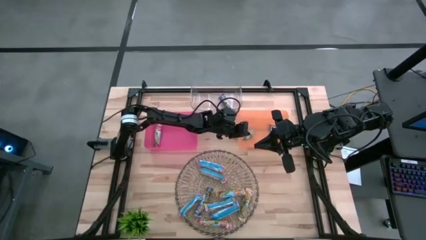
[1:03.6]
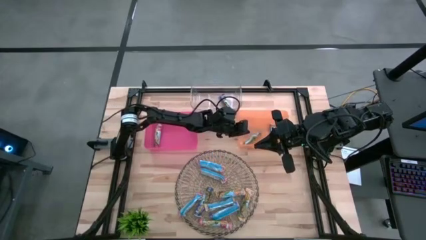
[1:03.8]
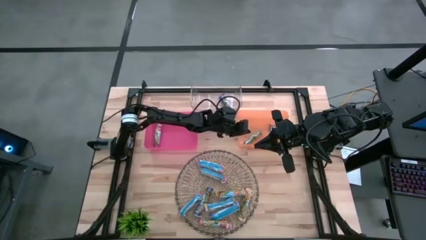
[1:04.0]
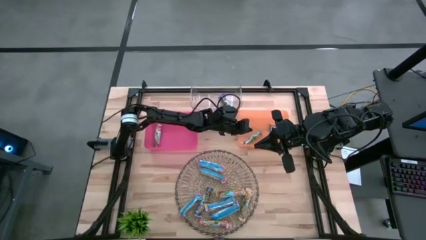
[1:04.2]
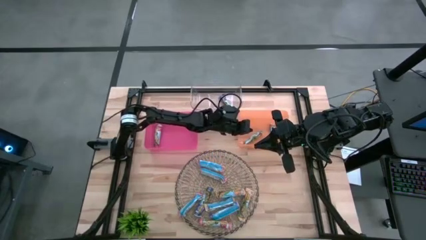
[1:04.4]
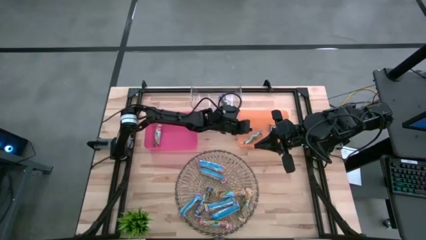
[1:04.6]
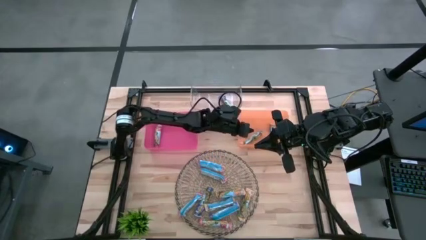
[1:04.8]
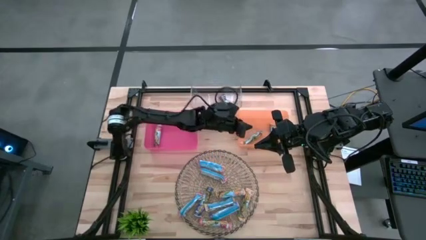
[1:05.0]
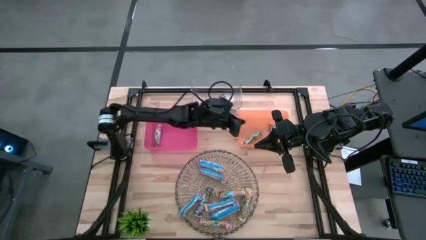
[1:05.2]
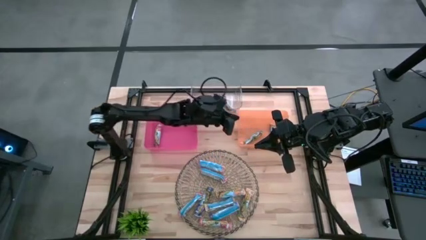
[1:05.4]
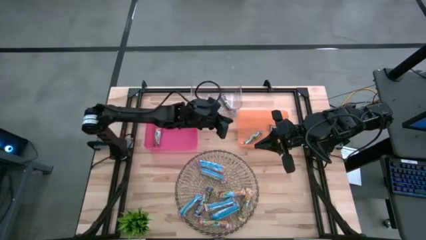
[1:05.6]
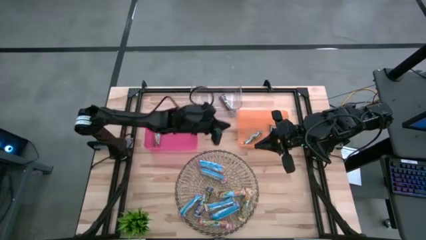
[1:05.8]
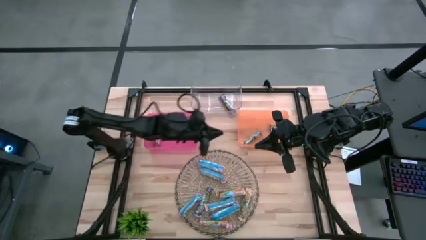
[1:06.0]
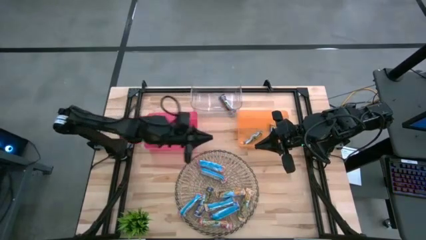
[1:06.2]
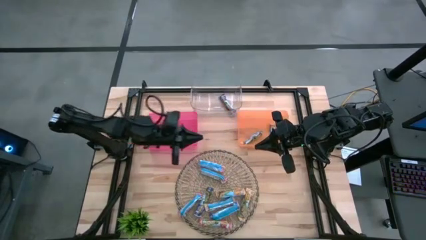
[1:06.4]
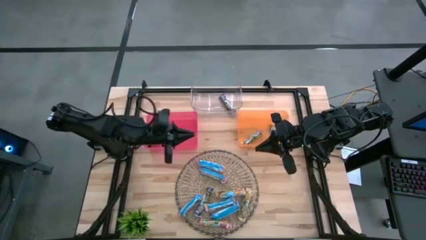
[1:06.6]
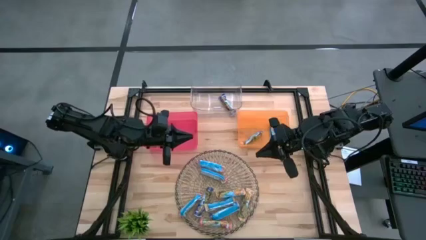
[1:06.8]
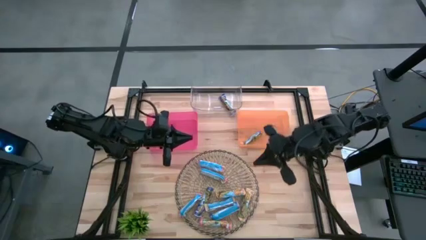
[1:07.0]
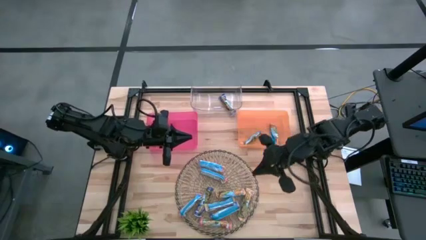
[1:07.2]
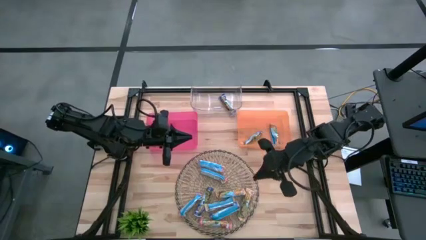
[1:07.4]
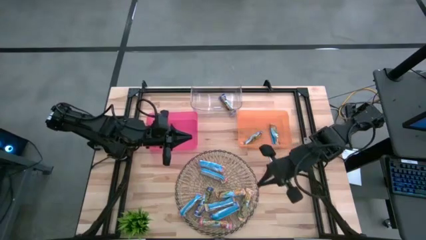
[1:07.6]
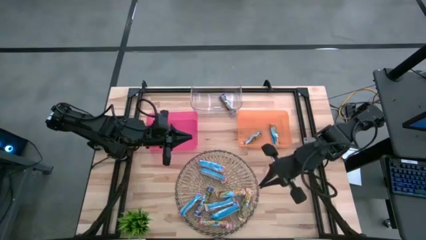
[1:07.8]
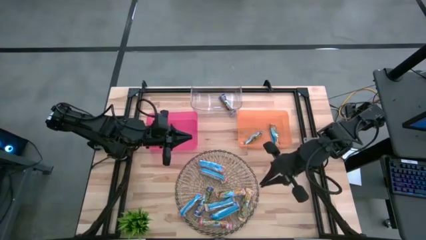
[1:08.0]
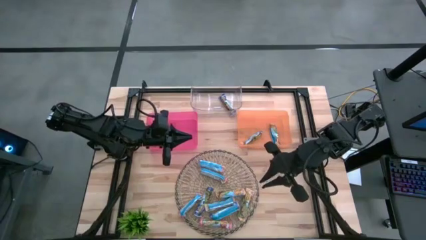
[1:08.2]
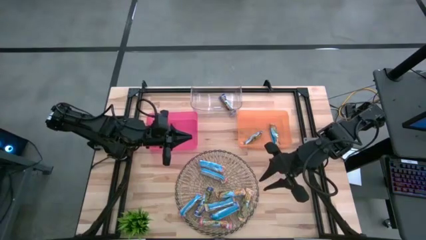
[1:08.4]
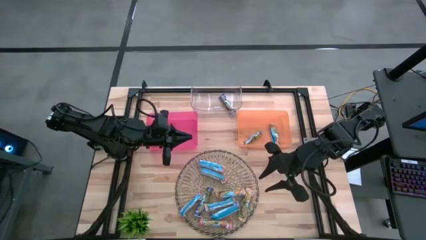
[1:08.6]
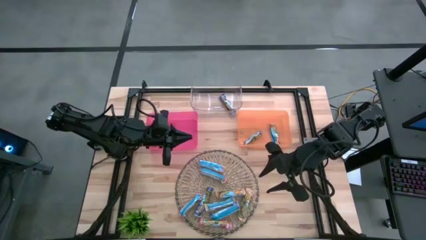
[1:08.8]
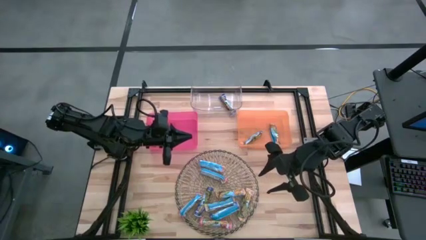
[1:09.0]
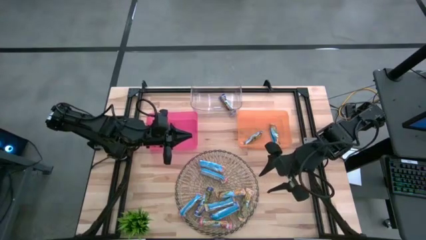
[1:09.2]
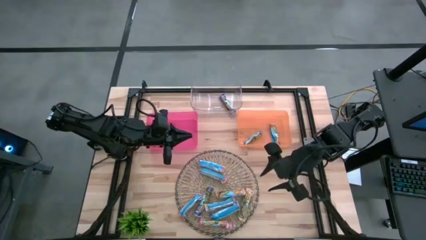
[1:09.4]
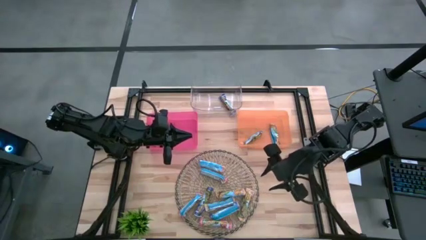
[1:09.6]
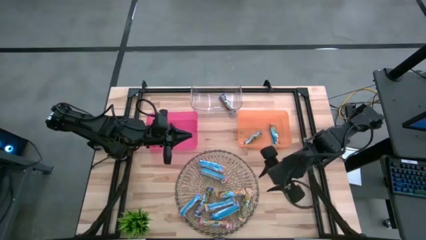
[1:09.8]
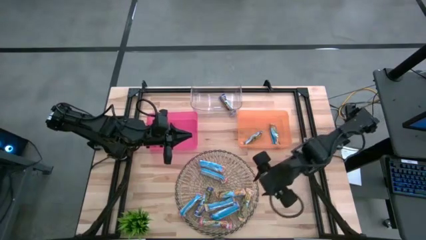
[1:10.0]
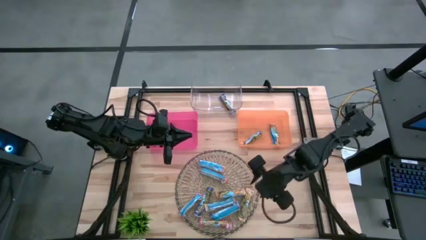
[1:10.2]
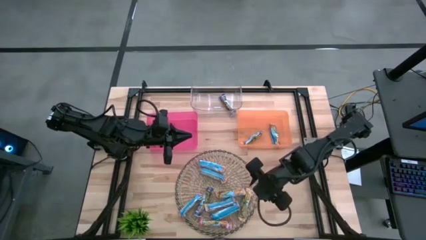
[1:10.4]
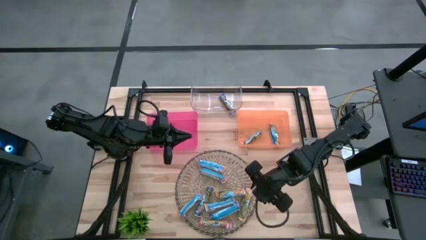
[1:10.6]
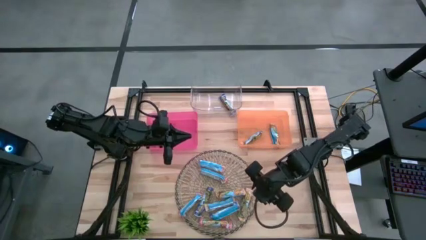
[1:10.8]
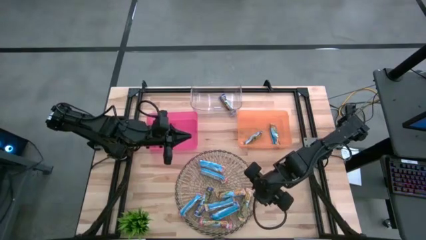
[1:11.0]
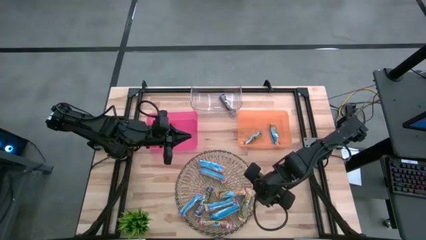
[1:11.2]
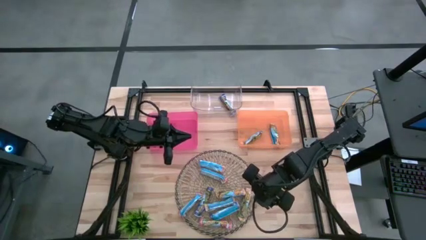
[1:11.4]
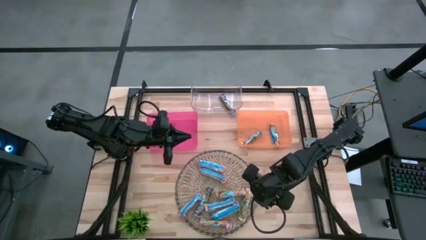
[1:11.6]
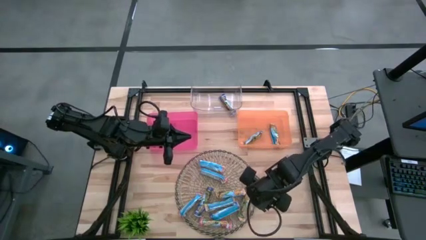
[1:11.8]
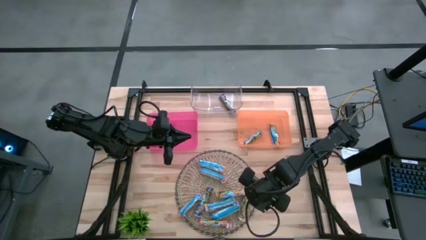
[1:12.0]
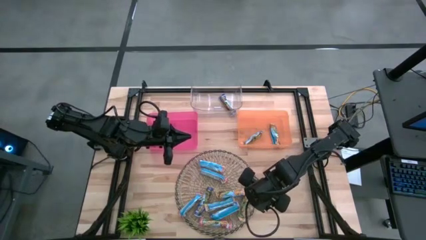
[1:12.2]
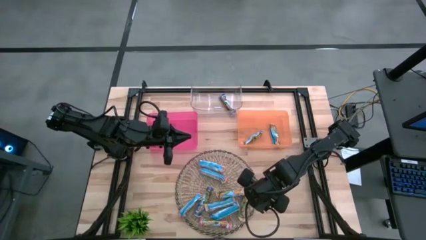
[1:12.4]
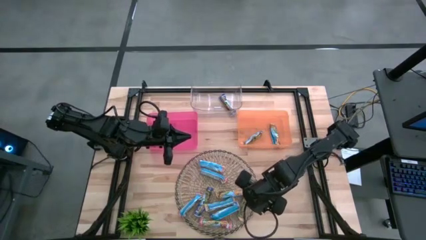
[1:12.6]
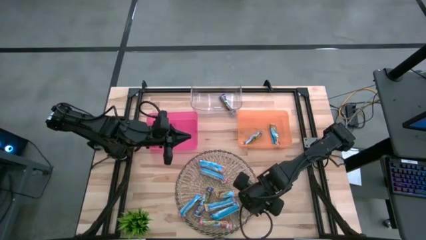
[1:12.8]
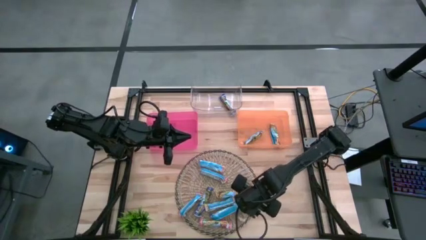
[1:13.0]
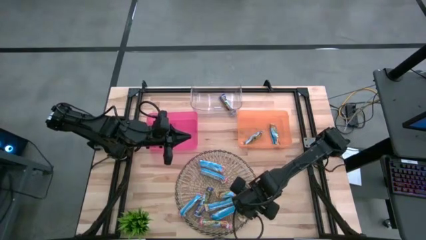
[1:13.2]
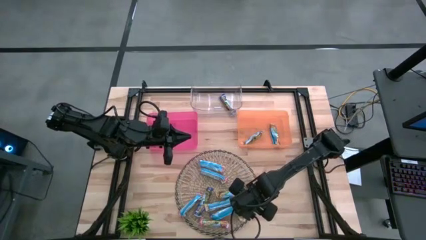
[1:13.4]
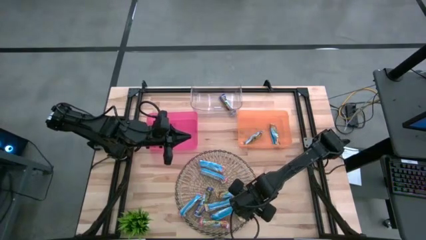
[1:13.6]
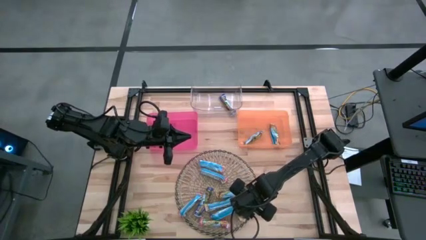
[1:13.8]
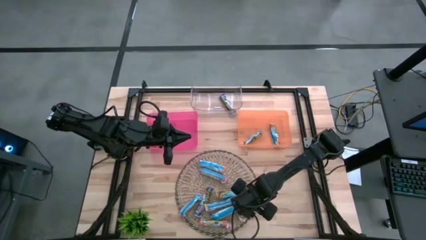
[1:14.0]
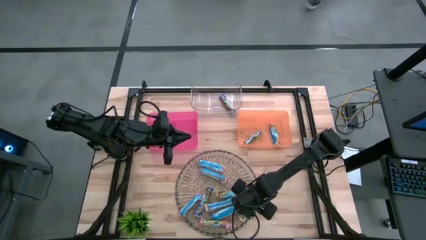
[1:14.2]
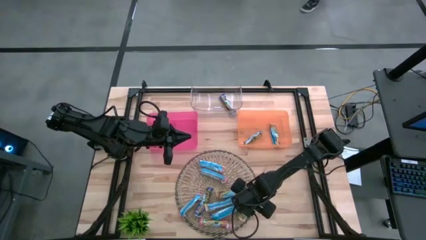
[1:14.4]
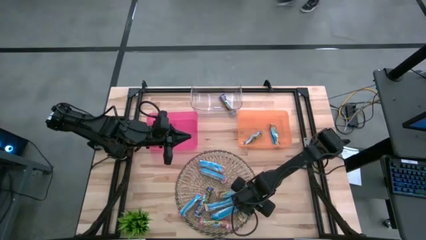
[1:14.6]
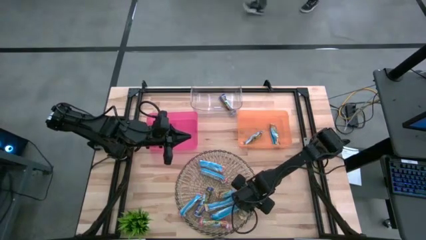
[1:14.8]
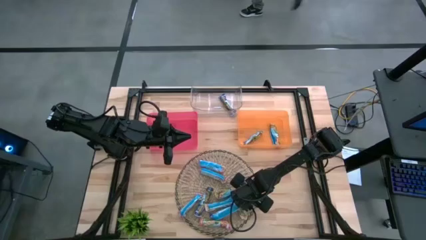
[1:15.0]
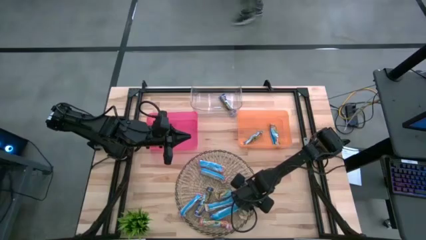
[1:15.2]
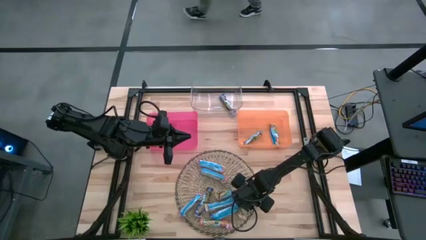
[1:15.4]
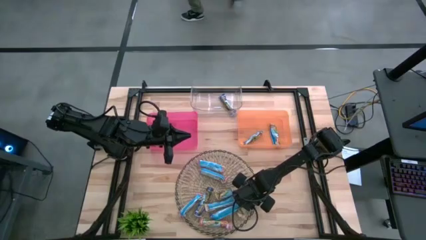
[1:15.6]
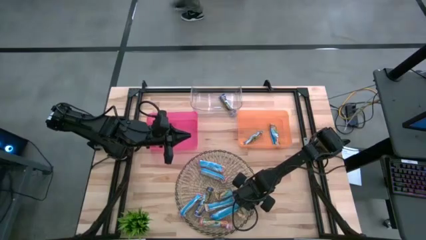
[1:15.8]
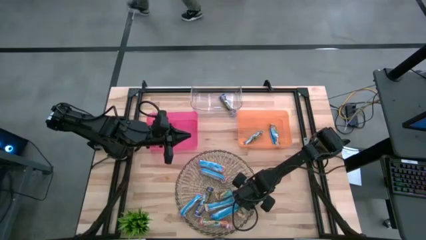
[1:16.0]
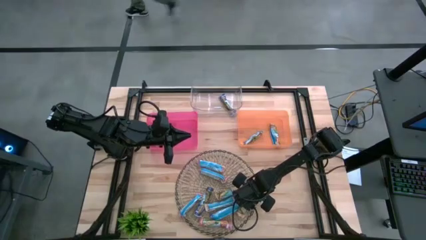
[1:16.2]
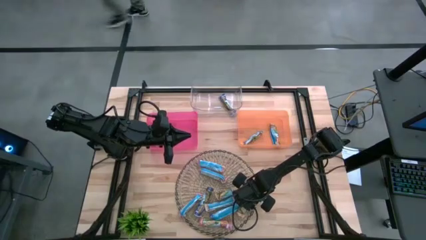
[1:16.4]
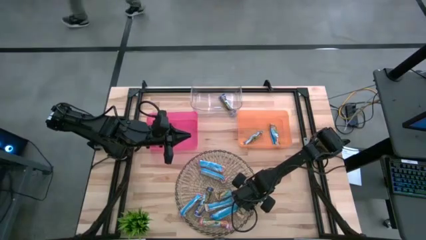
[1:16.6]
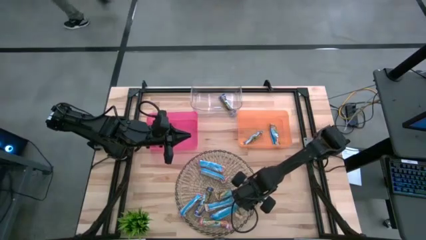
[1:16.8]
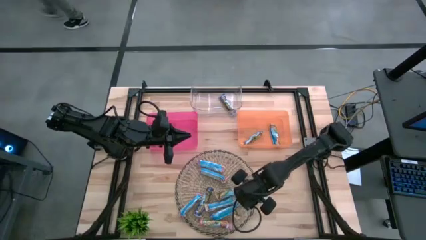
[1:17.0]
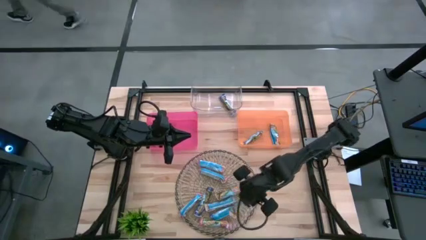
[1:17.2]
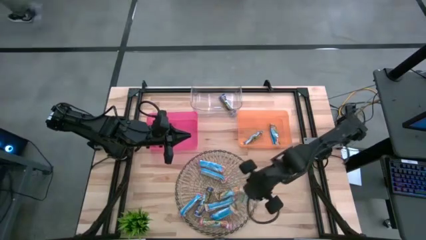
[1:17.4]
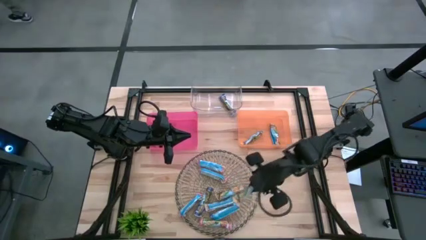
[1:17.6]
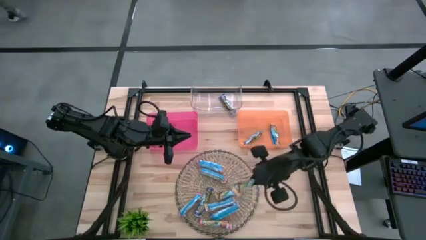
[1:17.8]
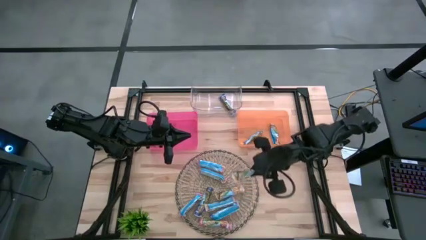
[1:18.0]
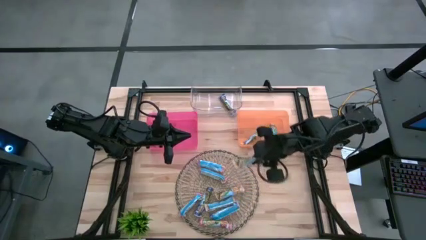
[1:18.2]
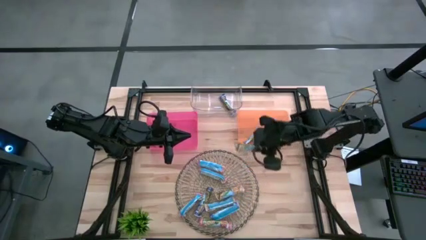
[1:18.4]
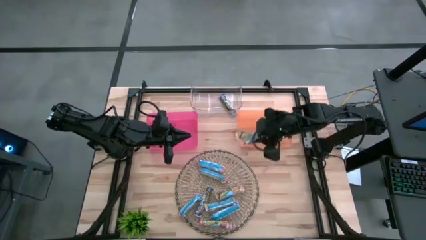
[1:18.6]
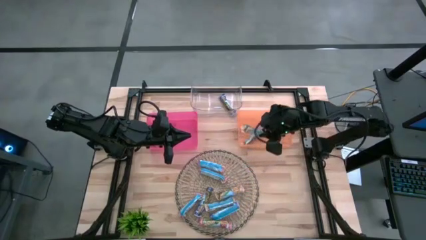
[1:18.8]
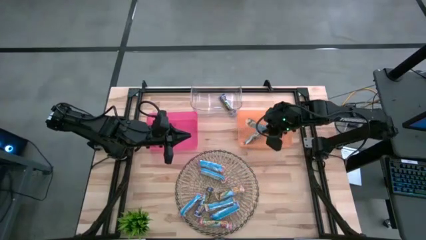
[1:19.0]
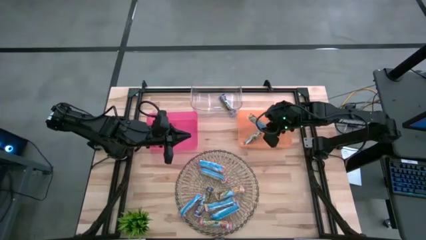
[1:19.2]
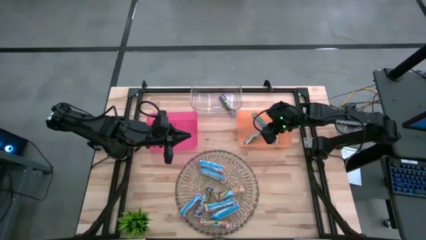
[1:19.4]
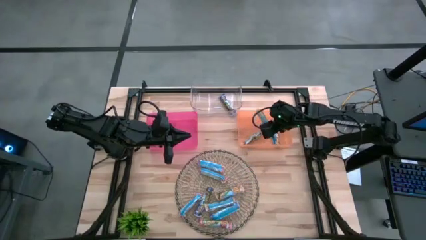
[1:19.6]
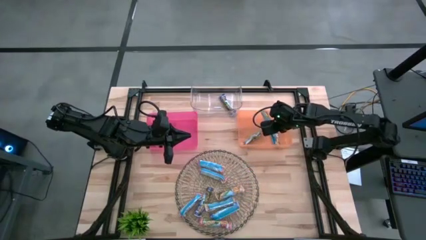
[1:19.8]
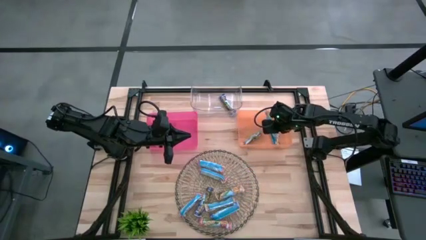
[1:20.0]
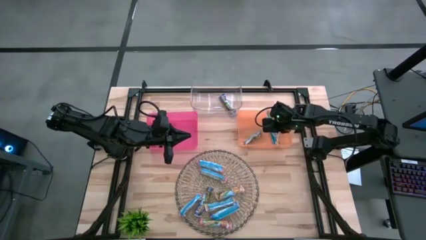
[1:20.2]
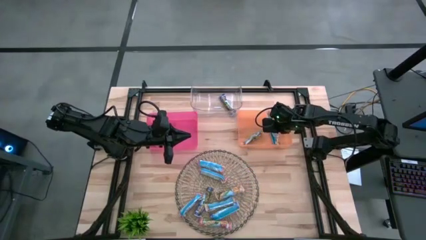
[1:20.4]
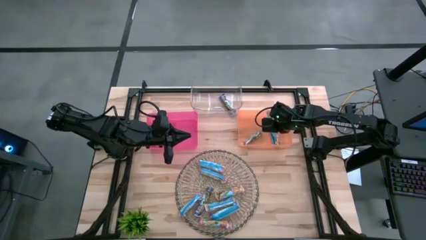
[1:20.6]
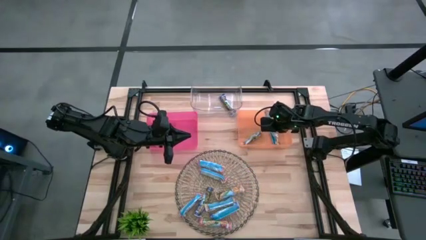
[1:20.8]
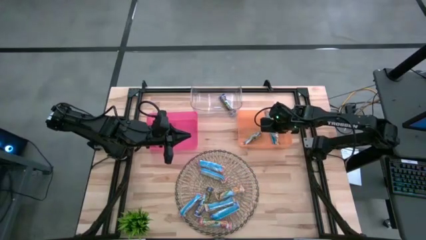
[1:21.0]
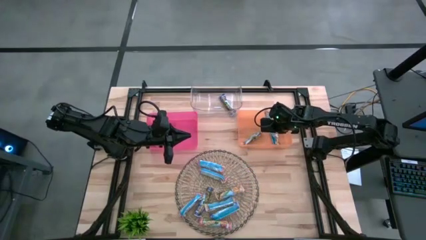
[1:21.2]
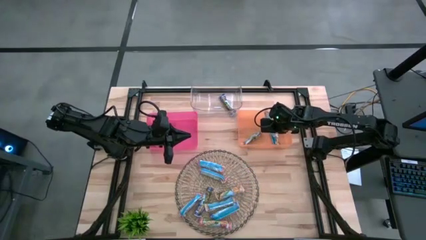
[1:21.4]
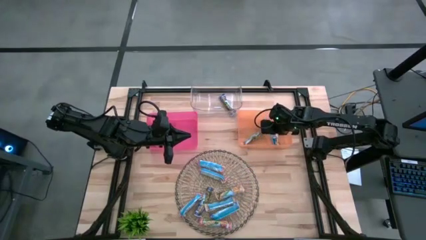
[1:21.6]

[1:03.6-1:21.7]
Task: Pick and place Granola Bars by type
Put the yellow granola bar into the yellow bin
